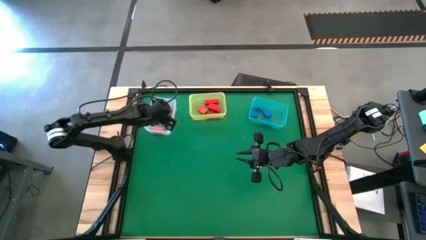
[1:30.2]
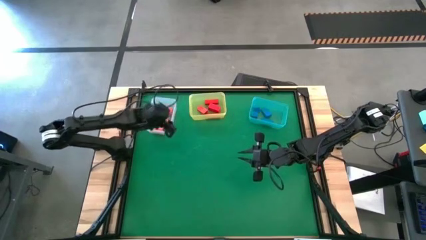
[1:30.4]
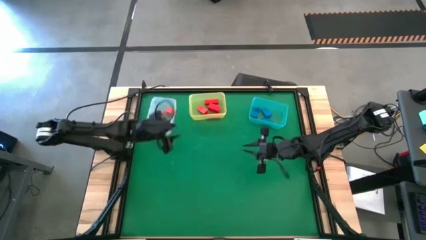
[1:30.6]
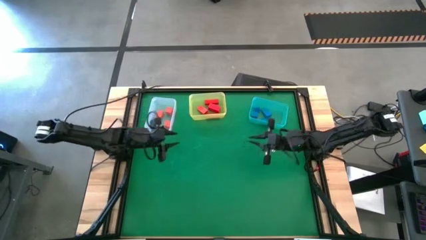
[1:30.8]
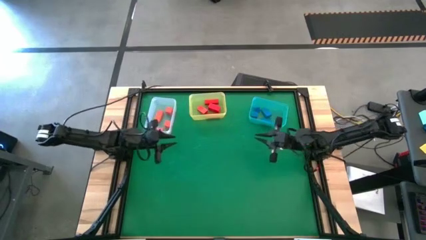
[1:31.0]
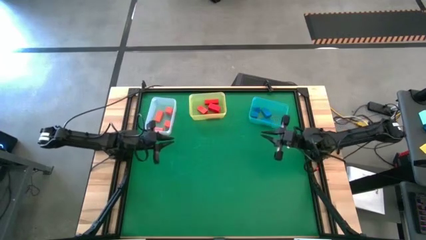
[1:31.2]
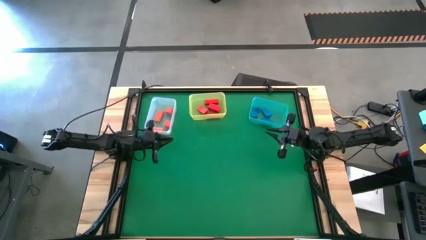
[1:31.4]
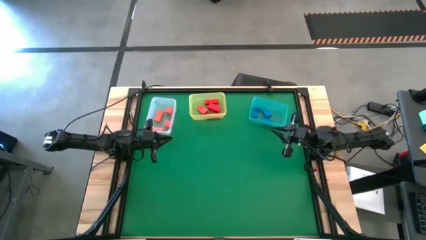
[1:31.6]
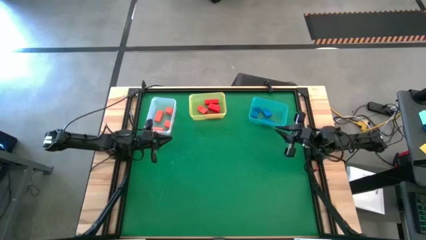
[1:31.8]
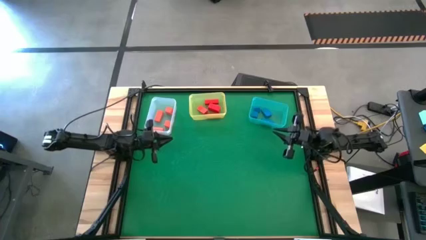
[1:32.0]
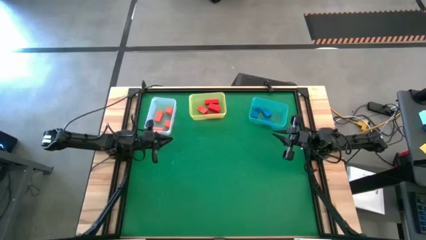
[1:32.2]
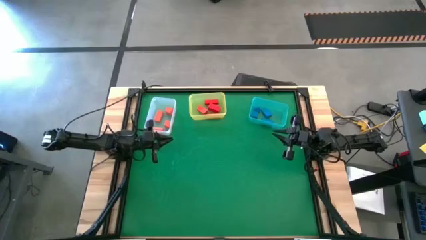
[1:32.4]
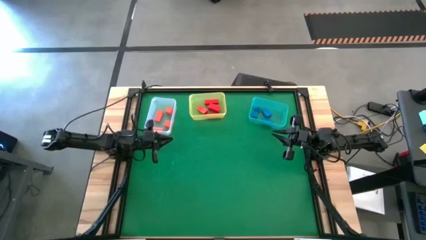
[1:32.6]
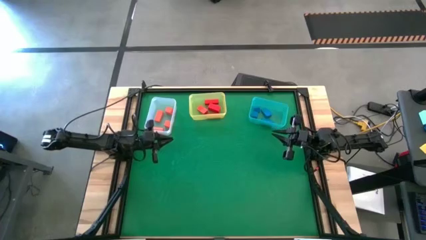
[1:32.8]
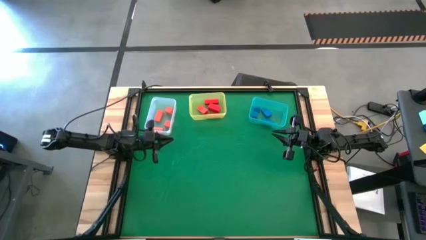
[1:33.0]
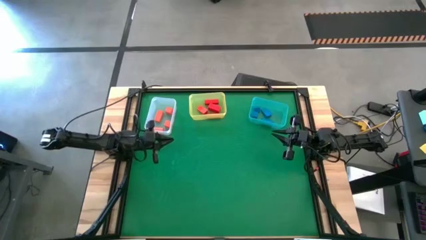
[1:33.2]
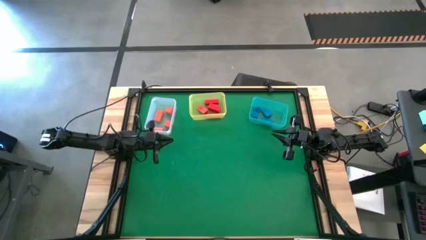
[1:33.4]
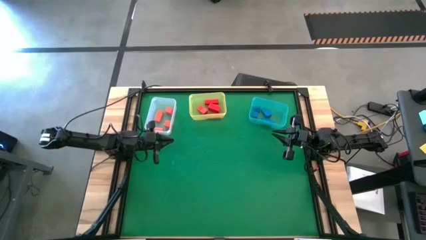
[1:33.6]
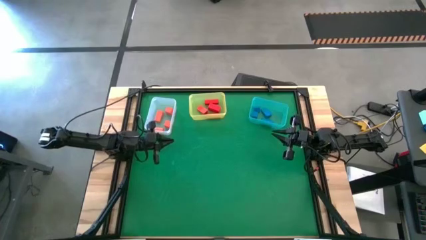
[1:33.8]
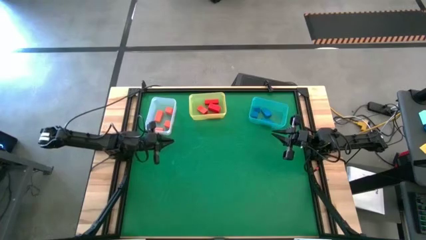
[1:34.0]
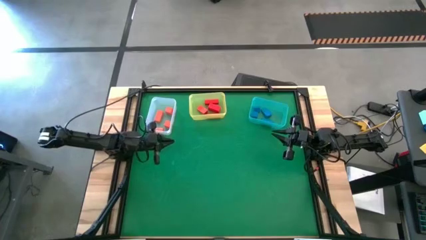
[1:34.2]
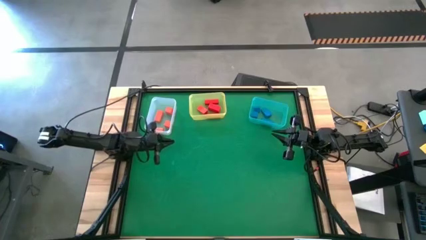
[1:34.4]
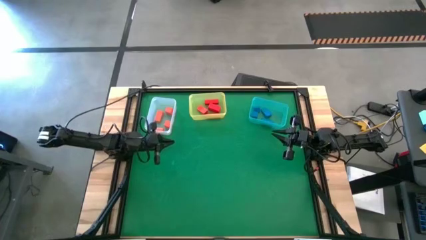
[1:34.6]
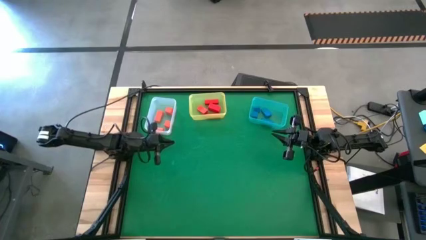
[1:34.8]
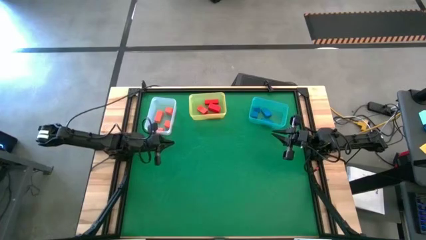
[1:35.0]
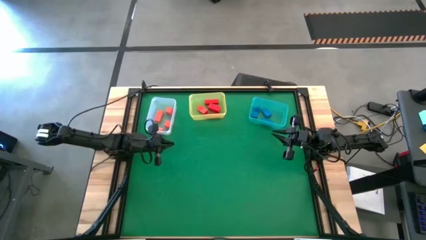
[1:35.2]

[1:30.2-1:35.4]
Task: Sort & place blocks by color
Return to Home Position

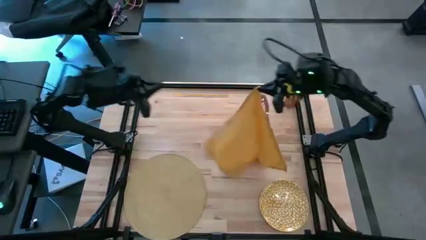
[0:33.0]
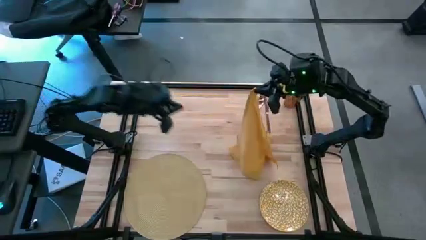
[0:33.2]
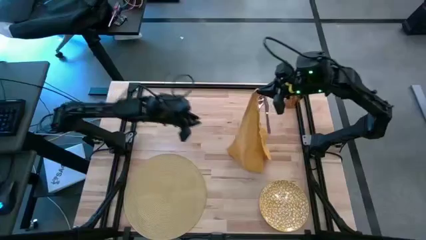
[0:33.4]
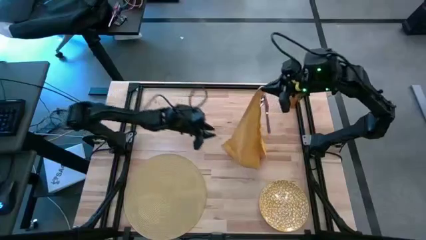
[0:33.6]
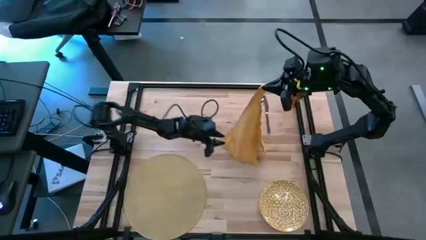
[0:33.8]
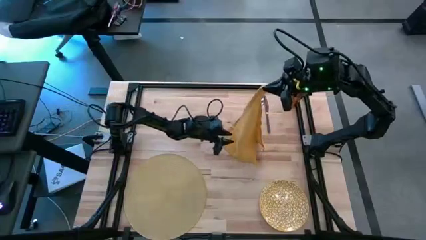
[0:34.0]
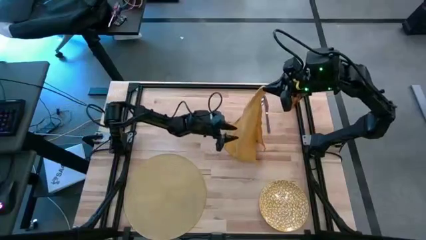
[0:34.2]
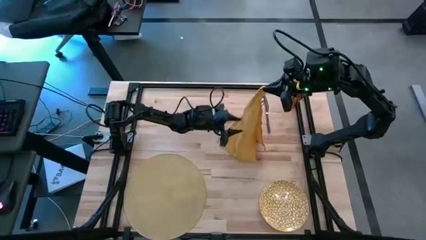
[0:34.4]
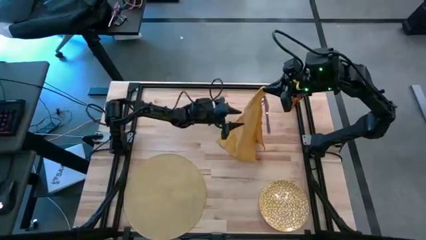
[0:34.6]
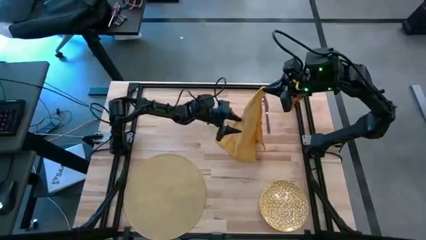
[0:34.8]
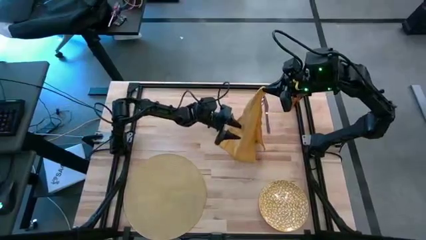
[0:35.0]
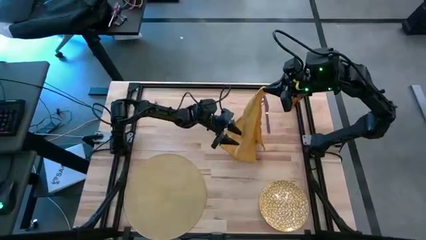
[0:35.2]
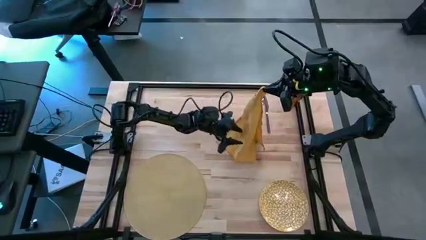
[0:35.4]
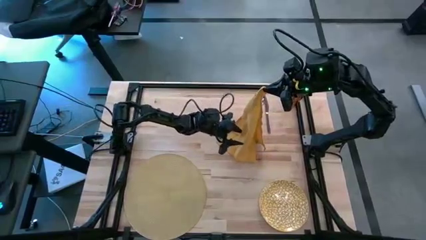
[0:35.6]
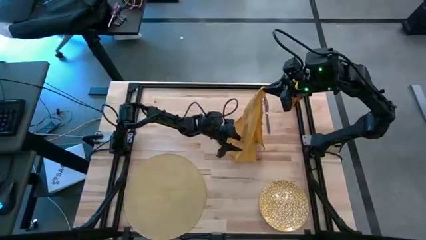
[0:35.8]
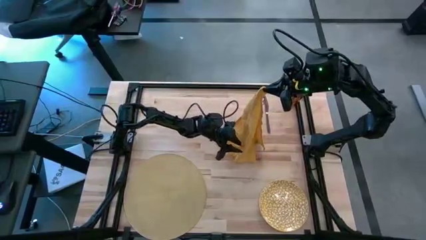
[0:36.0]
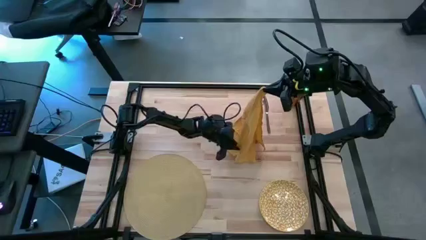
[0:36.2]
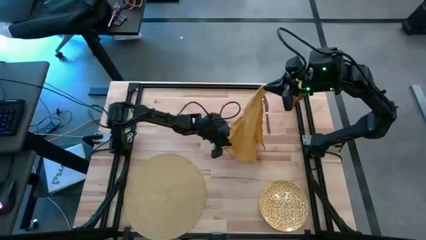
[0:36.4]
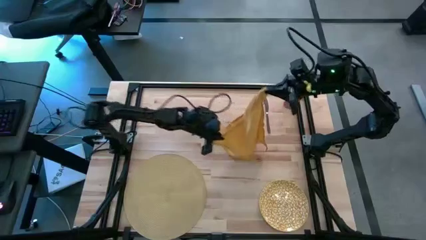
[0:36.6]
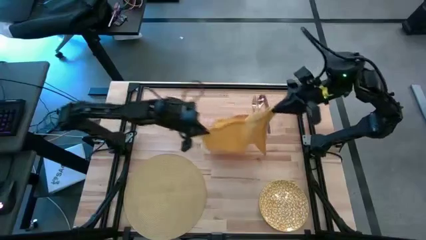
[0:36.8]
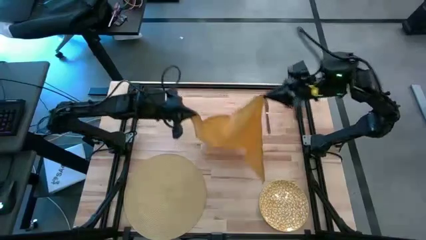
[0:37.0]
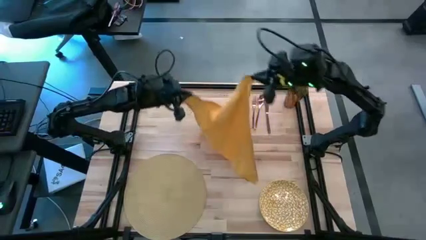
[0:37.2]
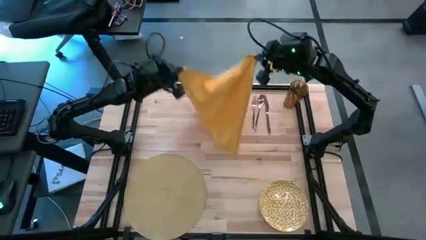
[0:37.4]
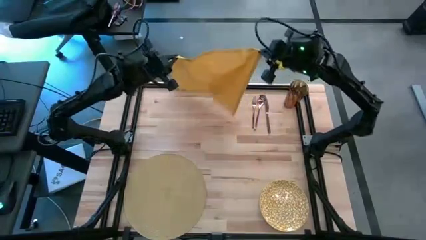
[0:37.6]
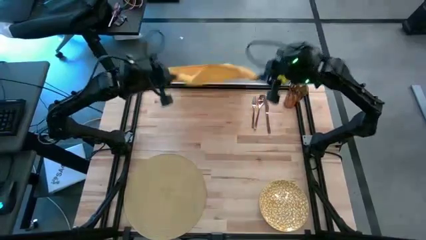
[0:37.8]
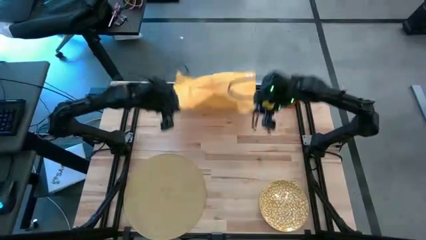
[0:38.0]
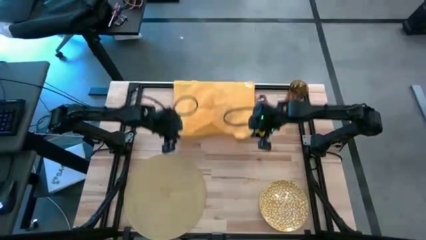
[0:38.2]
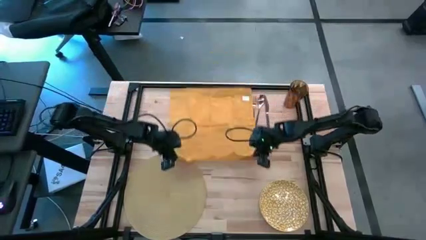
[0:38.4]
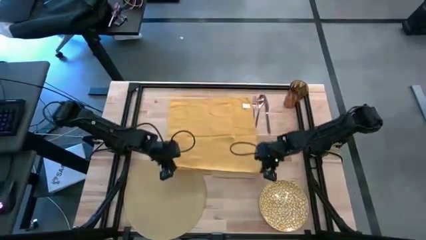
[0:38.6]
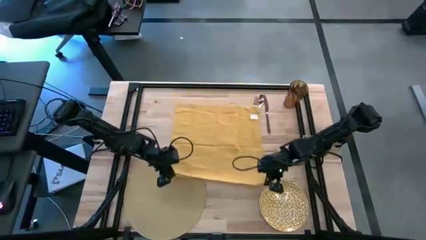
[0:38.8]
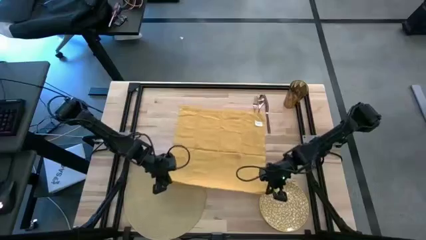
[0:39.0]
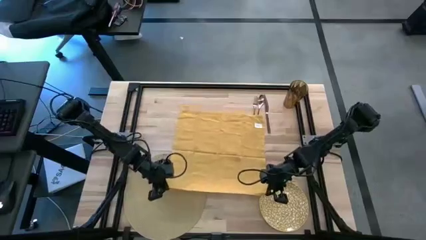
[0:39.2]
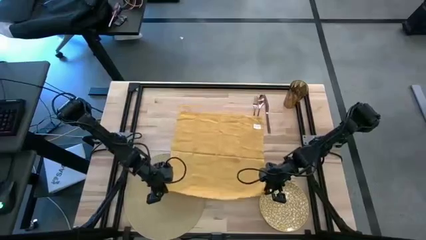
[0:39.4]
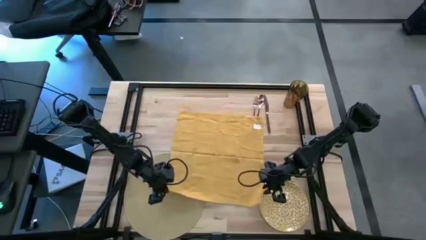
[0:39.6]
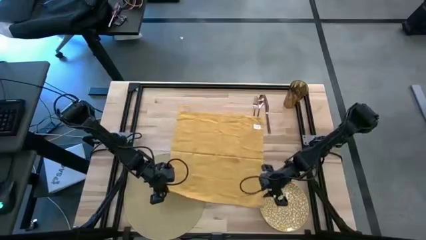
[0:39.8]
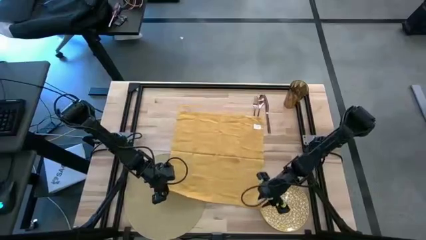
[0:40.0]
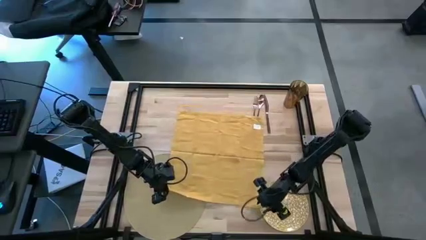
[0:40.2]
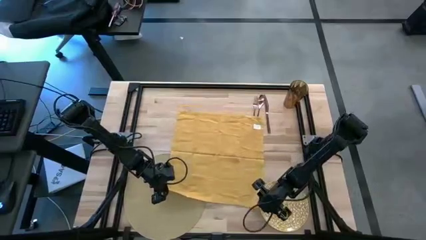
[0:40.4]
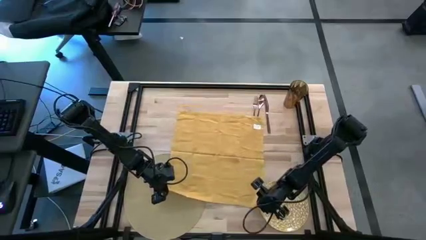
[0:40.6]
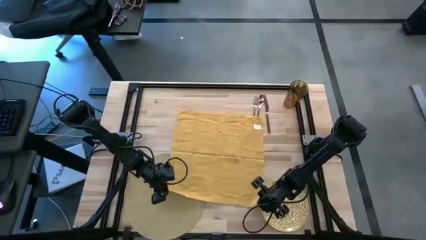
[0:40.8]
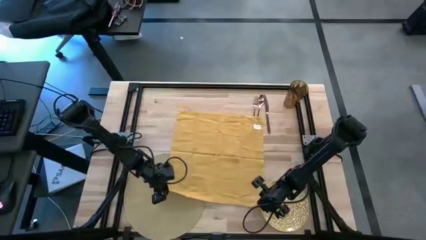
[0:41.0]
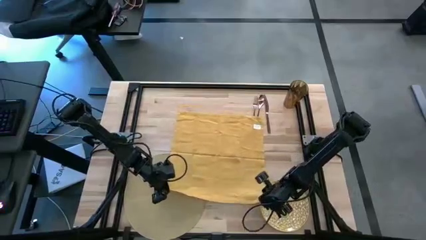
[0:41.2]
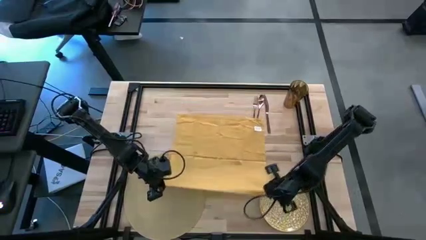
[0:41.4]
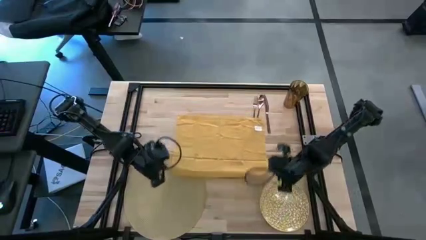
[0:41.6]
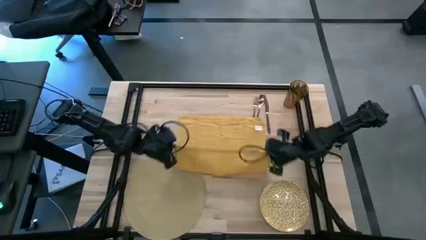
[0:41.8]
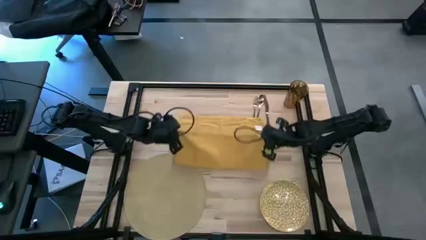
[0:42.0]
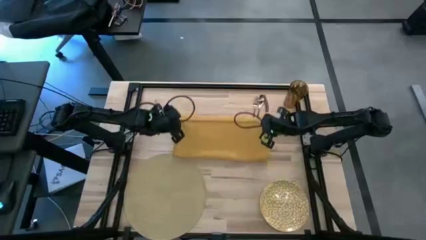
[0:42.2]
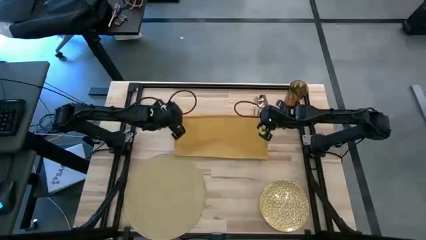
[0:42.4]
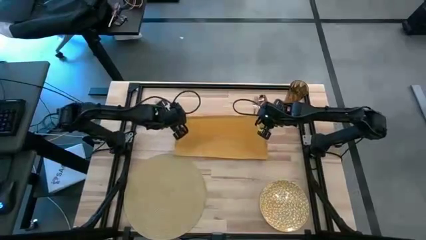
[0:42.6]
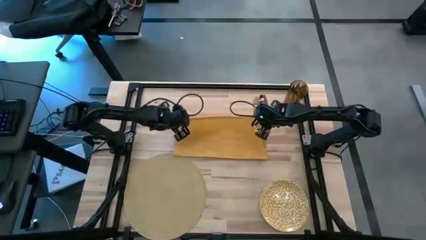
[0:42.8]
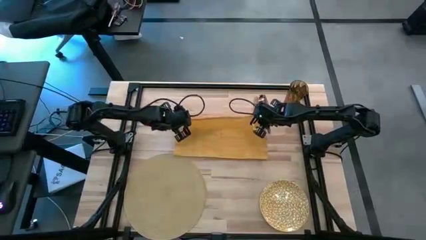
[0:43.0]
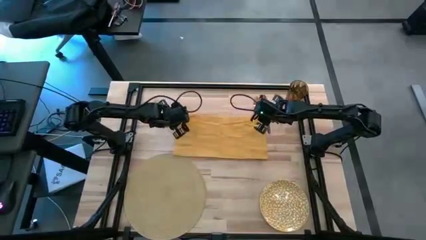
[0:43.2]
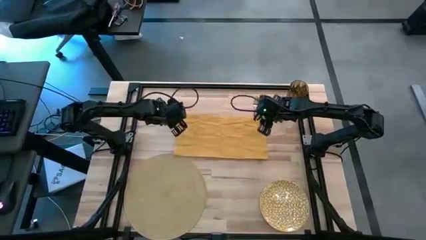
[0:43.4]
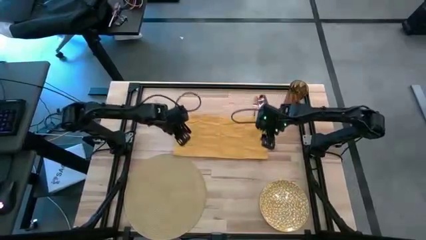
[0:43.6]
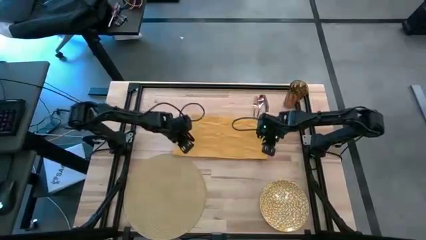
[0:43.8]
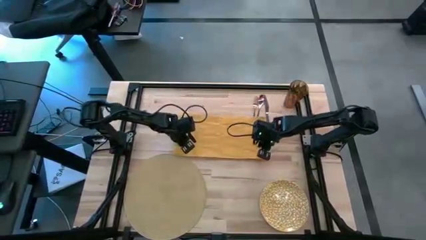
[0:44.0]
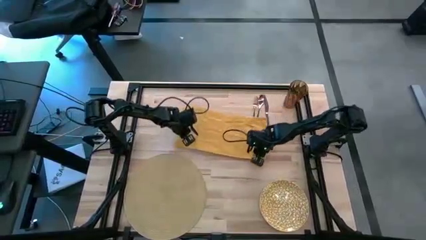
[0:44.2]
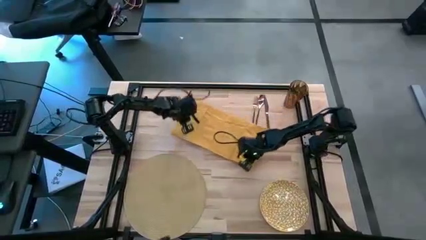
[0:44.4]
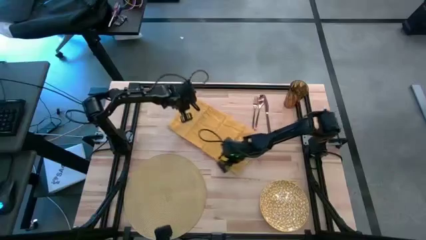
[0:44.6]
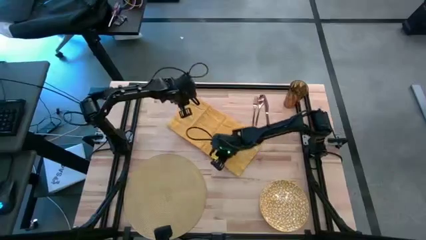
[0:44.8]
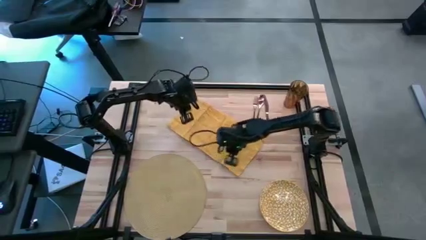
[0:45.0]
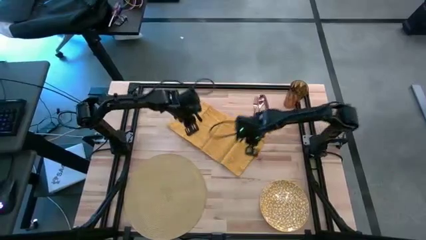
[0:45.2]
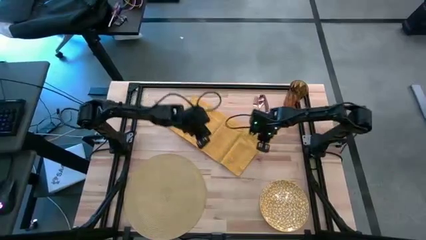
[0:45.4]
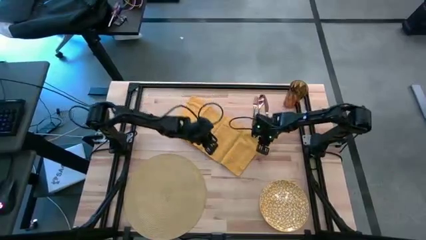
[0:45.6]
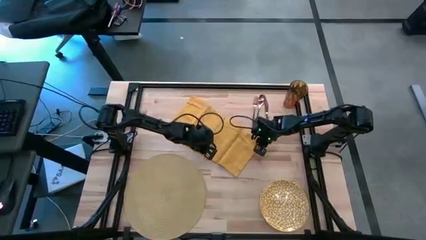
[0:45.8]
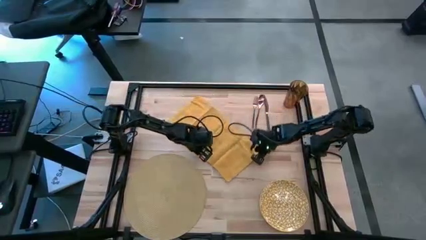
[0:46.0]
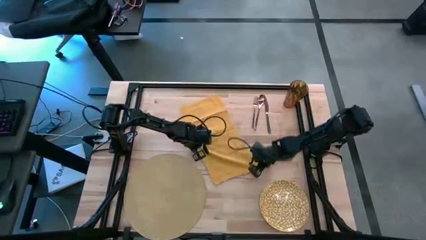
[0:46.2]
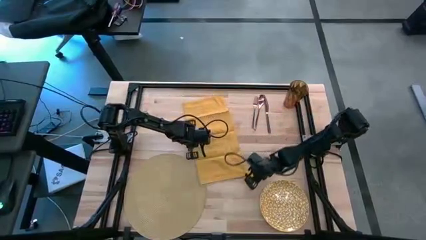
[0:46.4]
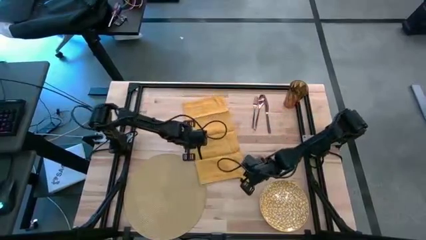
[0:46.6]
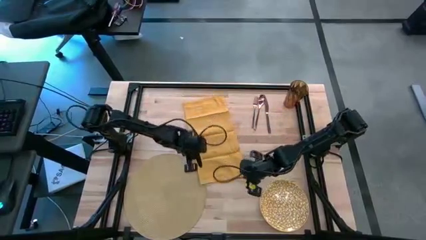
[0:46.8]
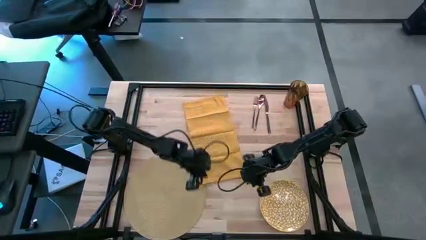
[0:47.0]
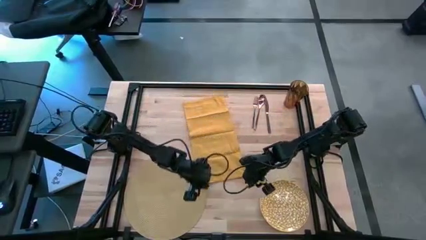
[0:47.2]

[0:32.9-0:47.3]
Task: Set table place
Fold the yellow napkin
